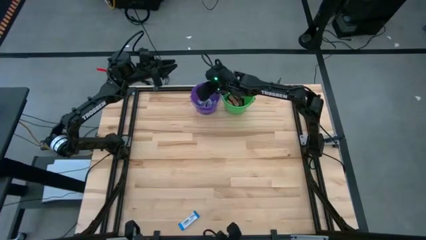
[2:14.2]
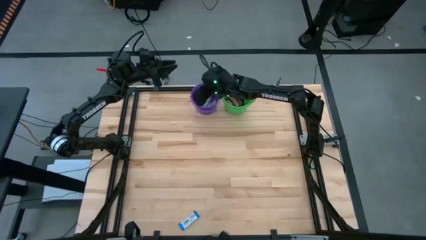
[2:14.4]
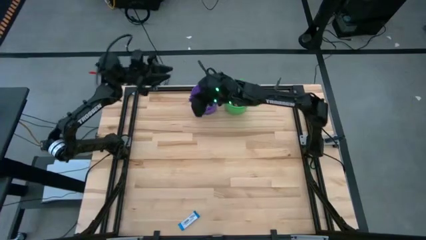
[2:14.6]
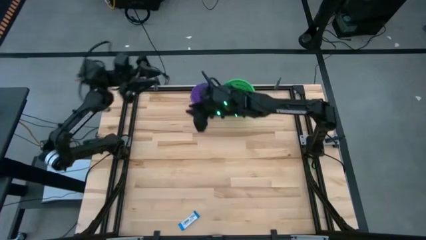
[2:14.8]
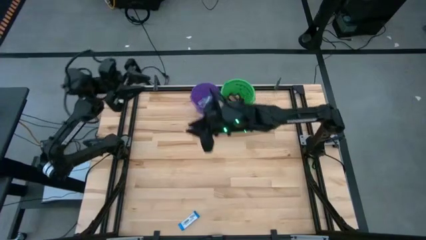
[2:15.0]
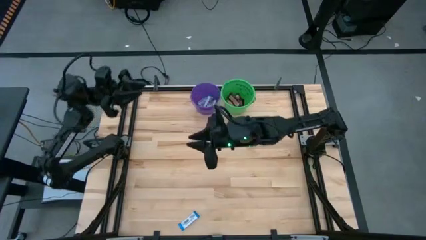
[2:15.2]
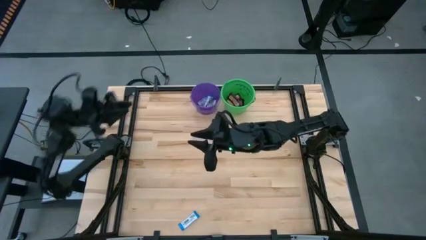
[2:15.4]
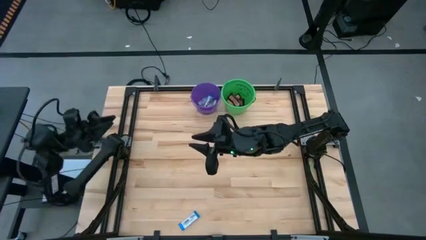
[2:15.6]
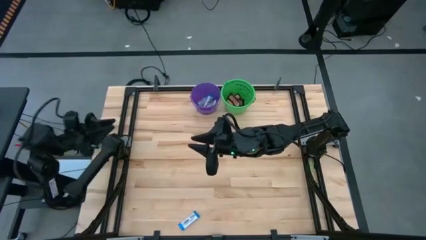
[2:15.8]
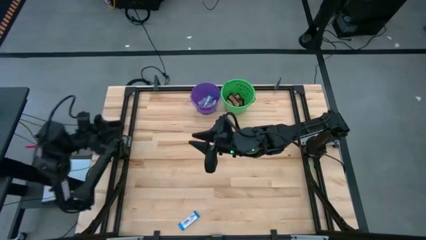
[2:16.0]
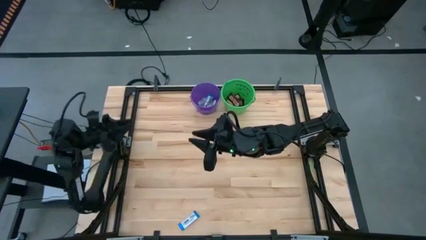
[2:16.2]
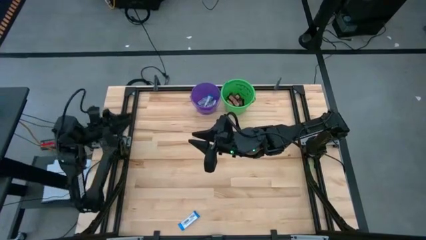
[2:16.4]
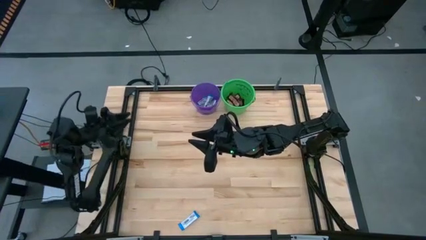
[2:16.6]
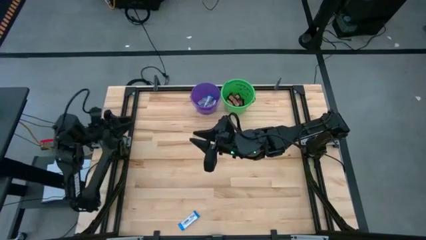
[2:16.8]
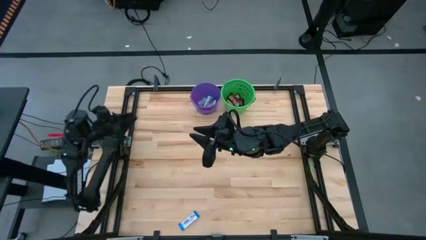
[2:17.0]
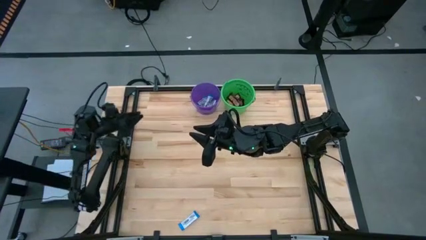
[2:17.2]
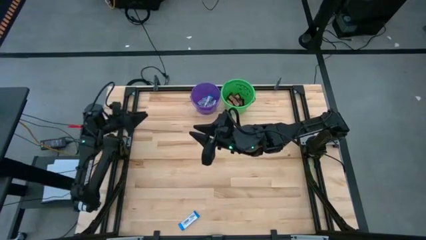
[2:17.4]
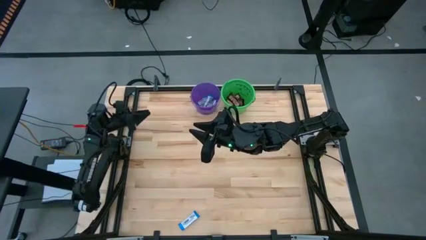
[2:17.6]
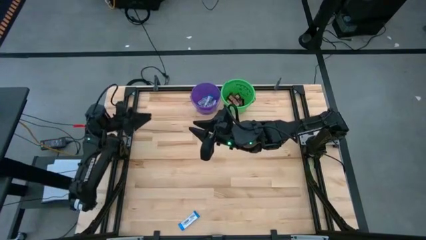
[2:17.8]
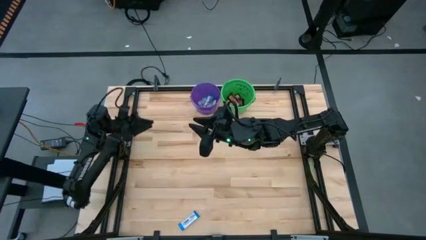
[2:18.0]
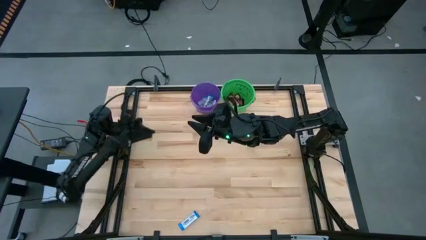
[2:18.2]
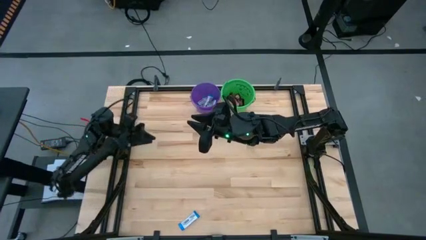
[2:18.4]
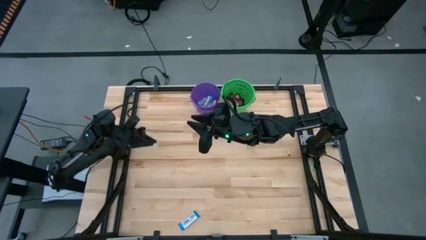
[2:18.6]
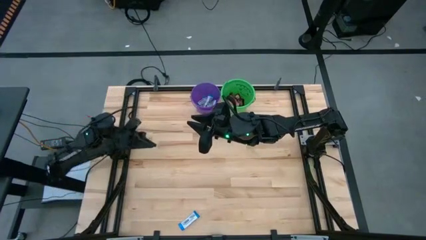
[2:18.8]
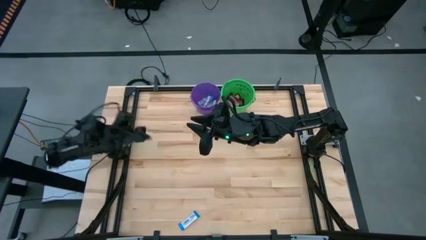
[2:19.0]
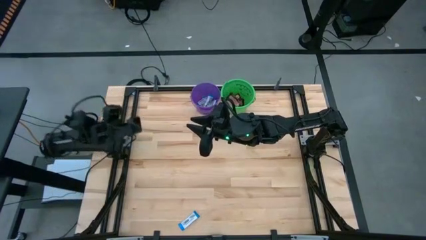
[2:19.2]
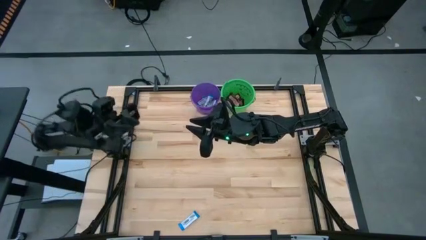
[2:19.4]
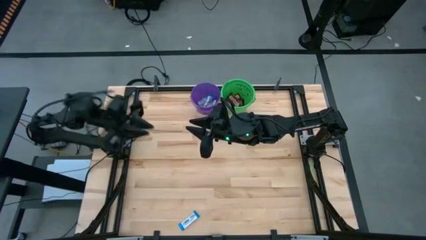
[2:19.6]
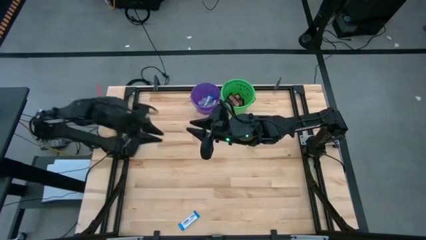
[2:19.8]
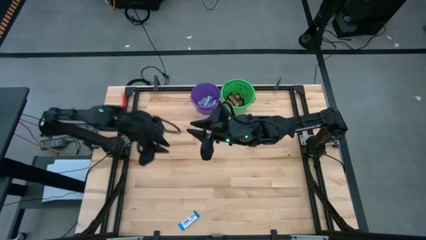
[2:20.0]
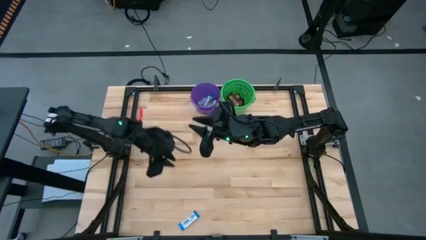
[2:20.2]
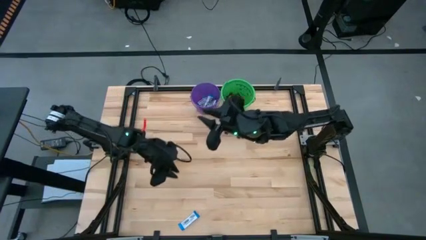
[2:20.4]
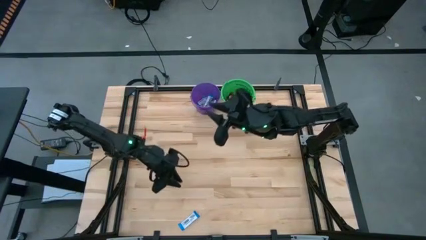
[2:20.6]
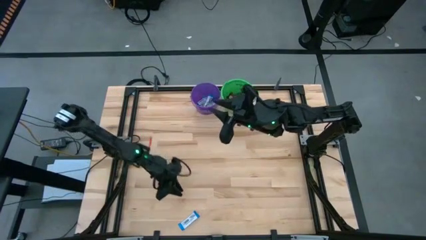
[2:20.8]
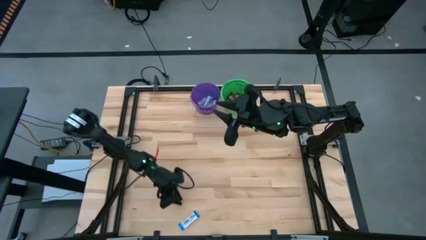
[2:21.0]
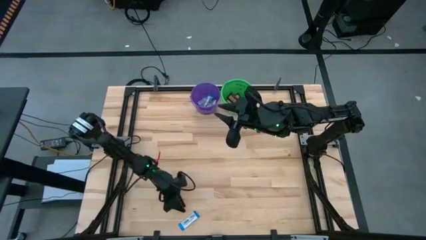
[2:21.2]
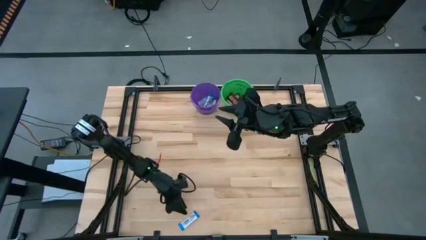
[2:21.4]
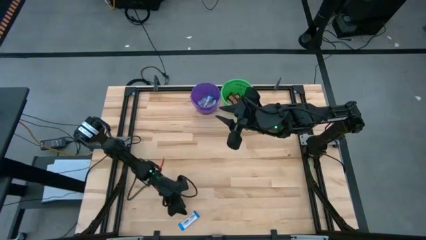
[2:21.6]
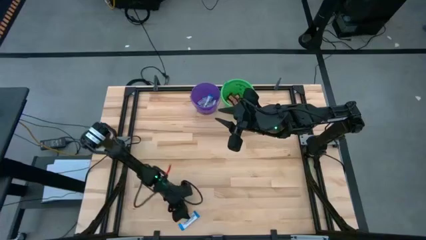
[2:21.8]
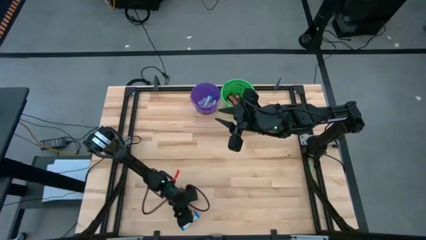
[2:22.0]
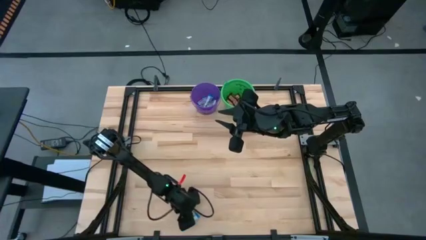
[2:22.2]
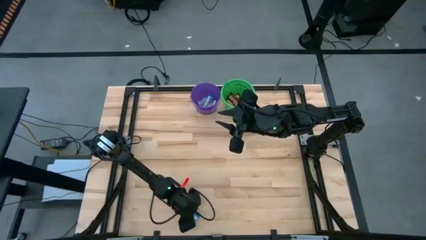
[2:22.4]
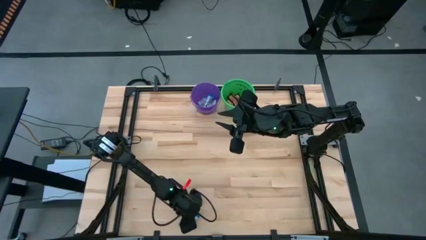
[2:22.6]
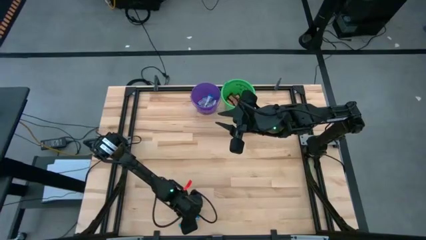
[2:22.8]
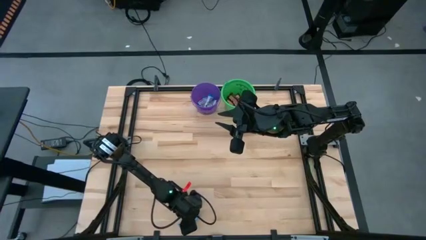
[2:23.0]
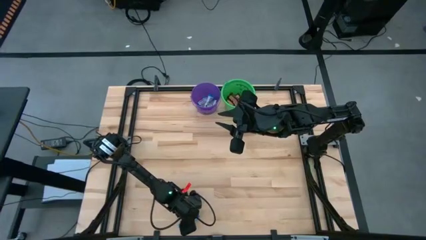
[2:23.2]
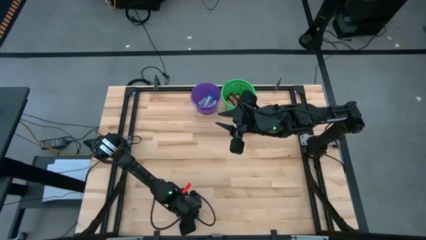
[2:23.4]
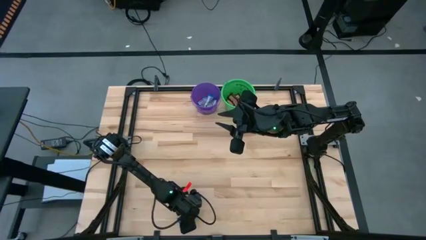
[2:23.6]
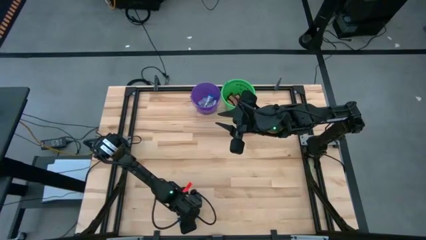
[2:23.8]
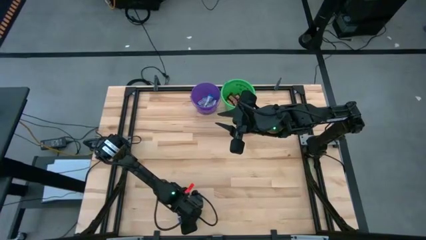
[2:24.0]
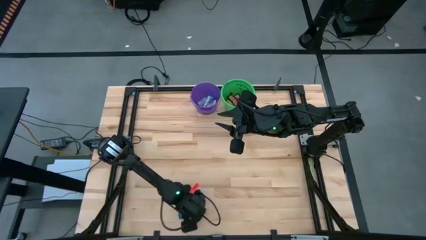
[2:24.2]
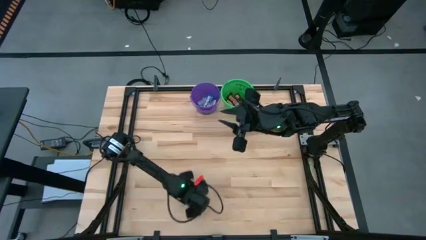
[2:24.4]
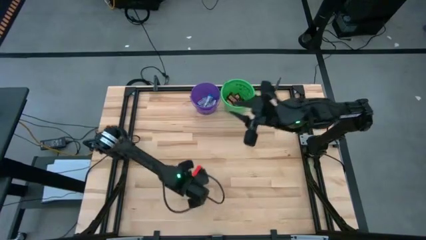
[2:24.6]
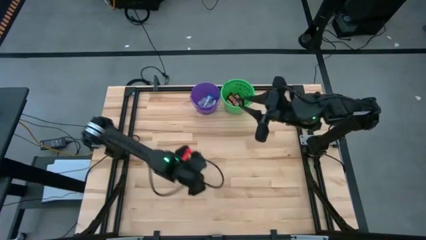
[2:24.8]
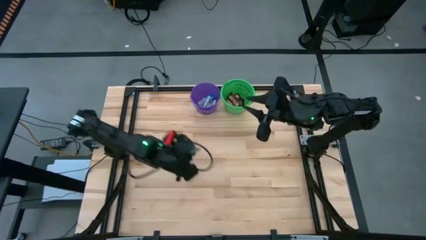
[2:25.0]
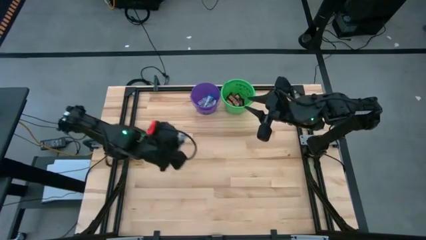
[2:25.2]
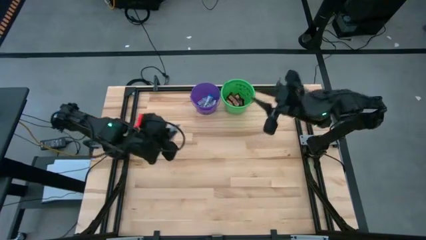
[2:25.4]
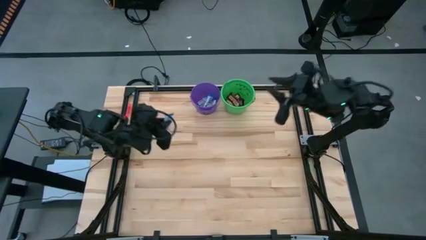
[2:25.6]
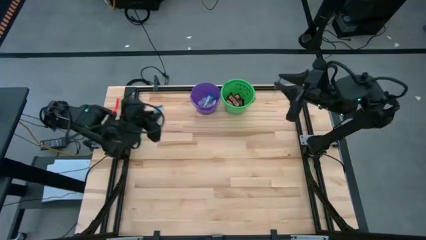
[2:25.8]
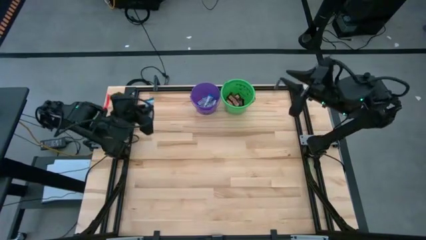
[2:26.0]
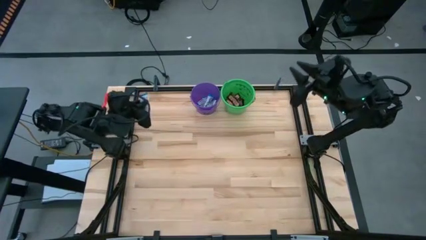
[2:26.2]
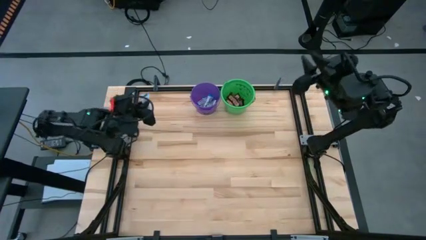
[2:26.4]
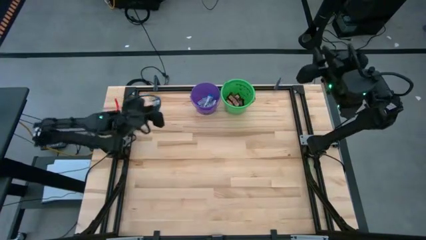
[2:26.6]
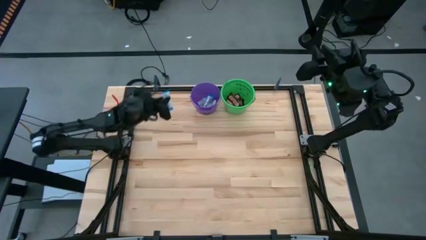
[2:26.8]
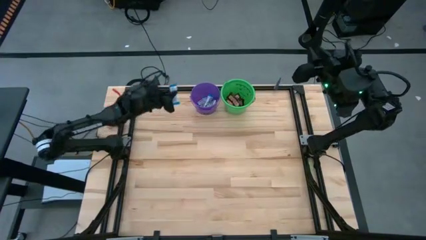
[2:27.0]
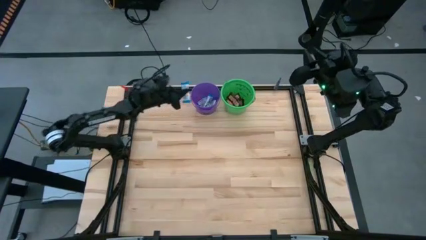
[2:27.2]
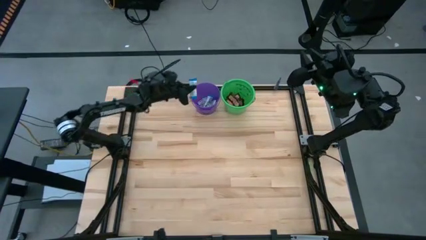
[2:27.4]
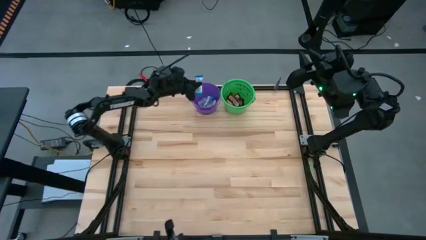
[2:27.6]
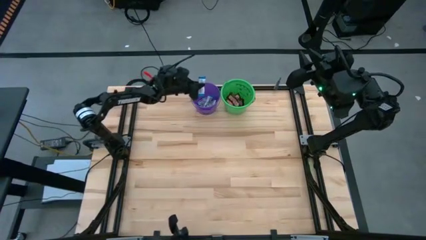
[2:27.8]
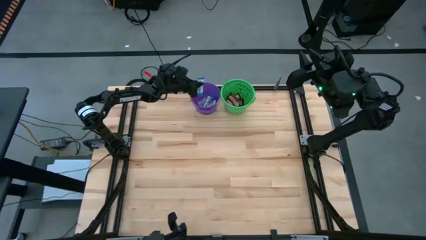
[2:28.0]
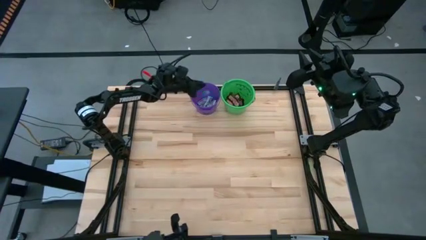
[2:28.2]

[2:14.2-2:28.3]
Task: Sort candy by brand, put in halloween buckets
Put the white chocolate bar into the purple bucket
